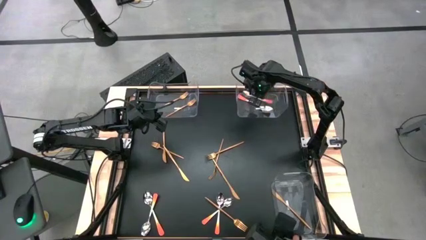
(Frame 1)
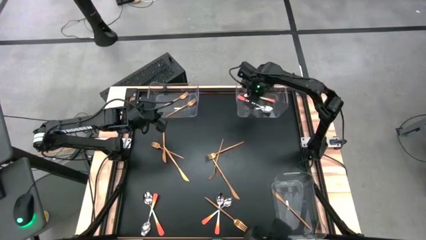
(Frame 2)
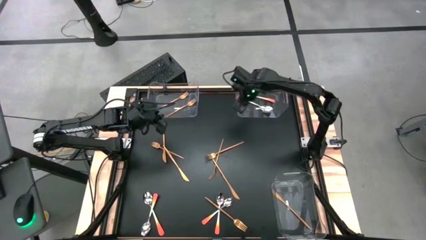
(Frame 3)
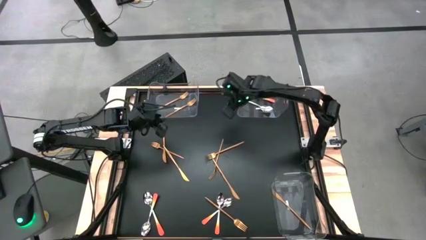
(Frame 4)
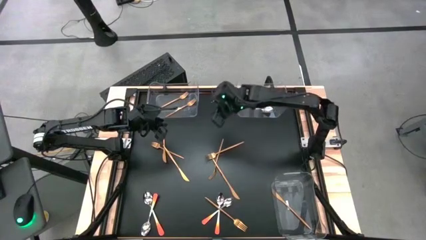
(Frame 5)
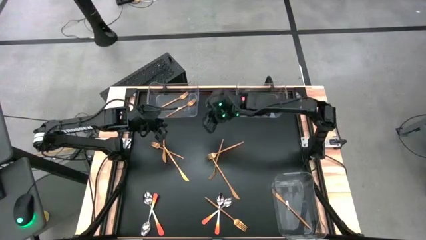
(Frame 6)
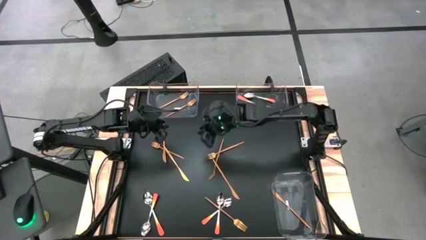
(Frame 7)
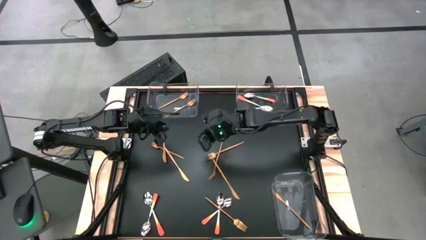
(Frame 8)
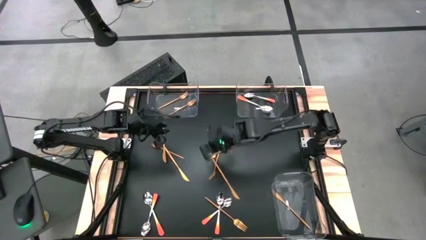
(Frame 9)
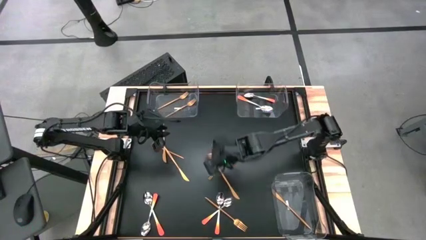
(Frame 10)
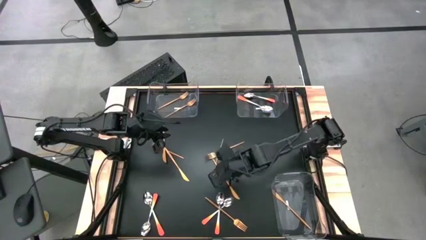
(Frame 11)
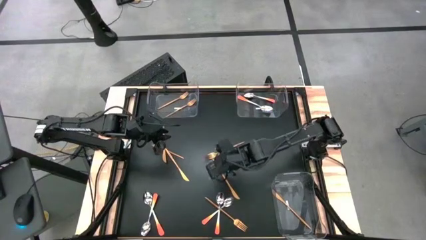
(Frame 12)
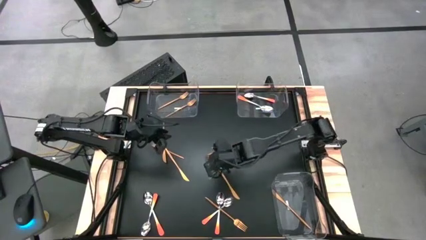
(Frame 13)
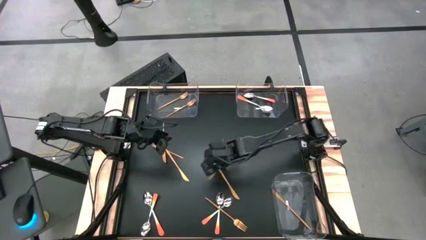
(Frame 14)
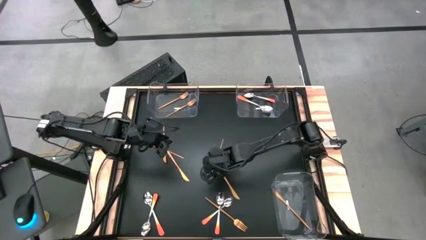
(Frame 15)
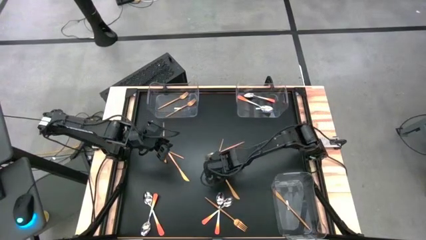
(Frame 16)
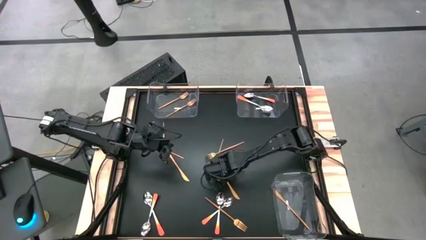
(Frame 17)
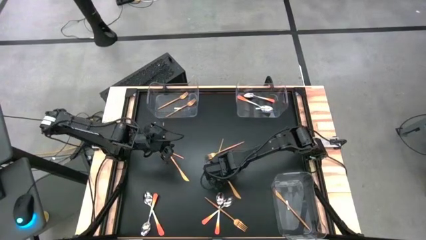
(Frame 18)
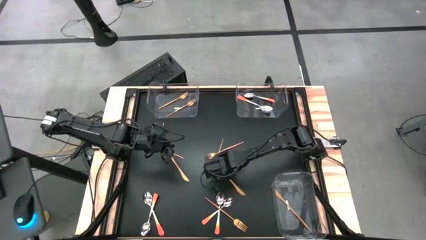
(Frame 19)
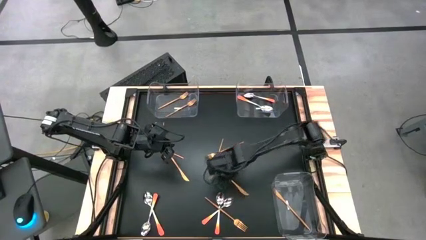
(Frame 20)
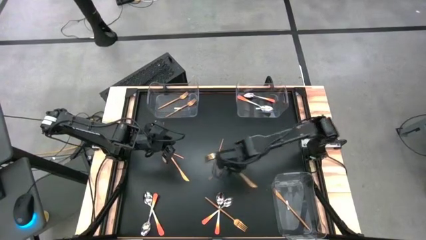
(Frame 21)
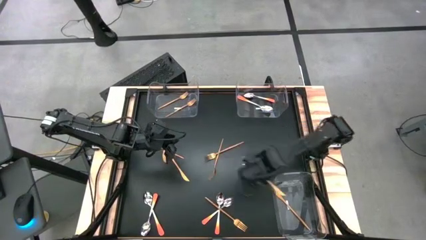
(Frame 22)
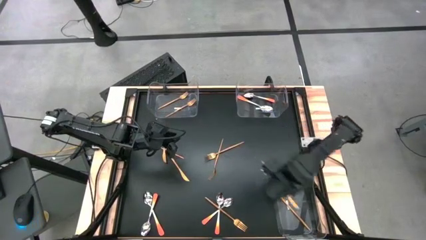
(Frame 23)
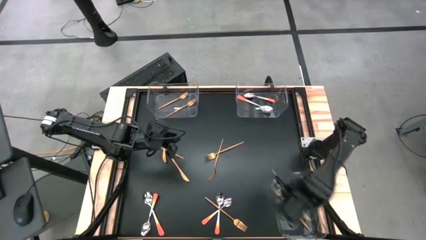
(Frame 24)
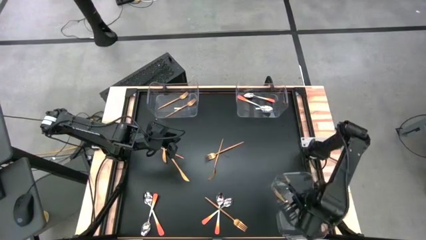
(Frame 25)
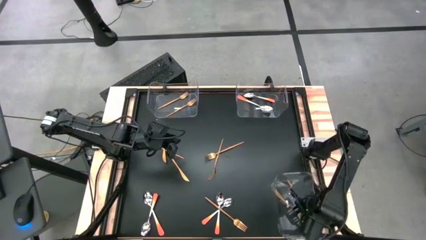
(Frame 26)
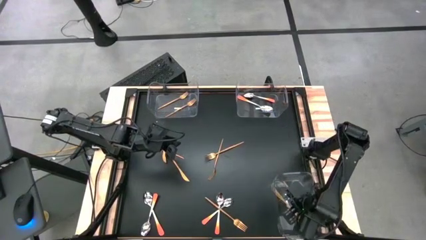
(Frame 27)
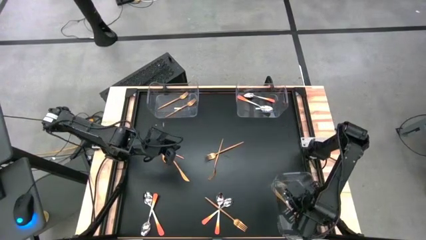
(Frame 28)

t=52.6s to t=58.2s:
Task: Sort silverware by color (type)
Put the gold table knife into the bottom left transparent bin

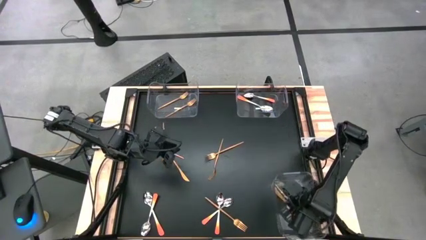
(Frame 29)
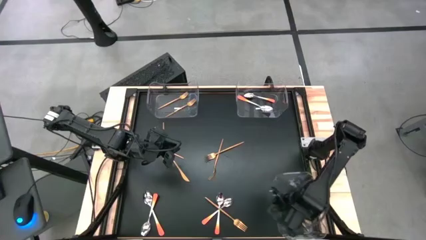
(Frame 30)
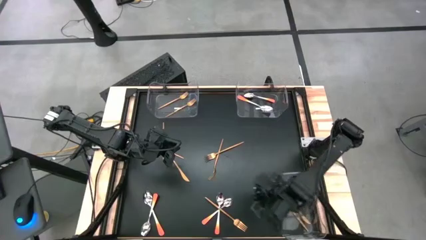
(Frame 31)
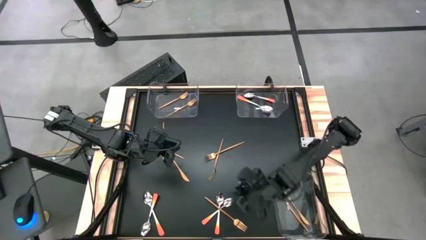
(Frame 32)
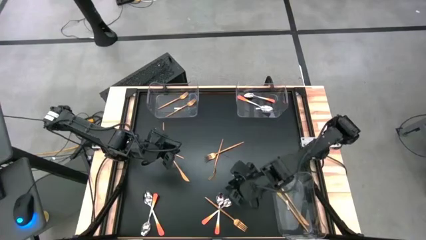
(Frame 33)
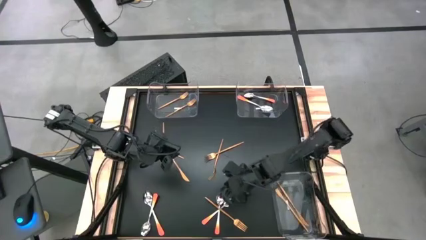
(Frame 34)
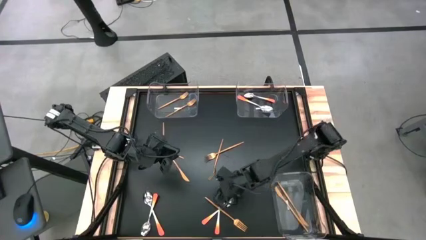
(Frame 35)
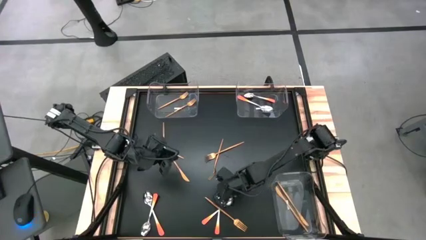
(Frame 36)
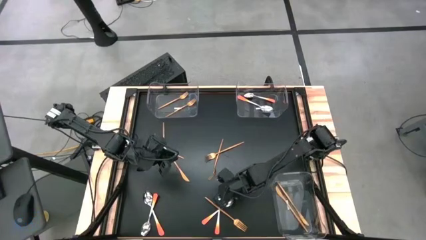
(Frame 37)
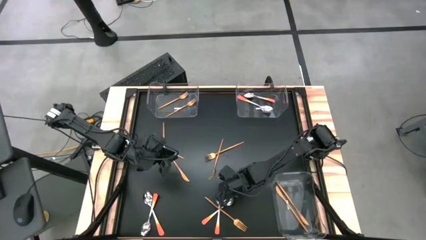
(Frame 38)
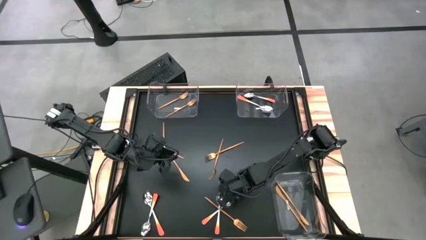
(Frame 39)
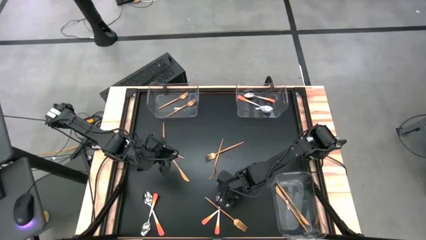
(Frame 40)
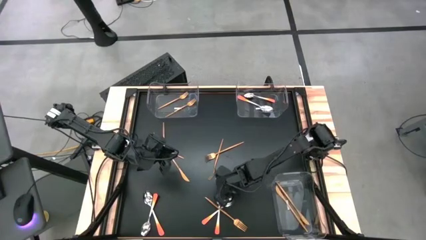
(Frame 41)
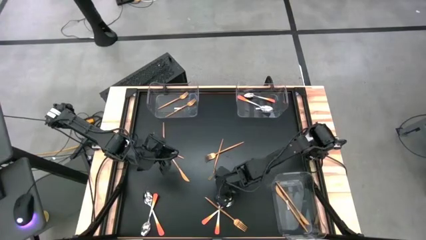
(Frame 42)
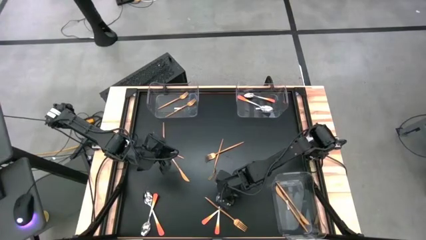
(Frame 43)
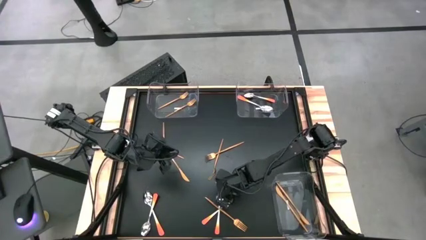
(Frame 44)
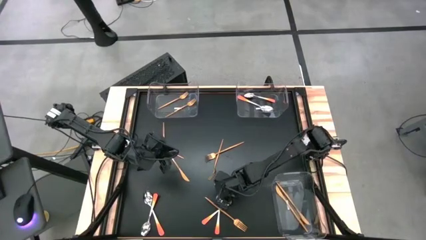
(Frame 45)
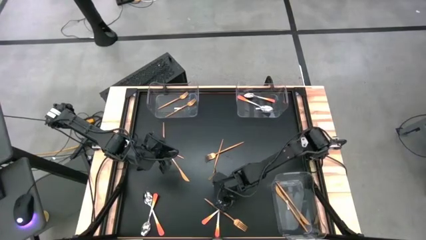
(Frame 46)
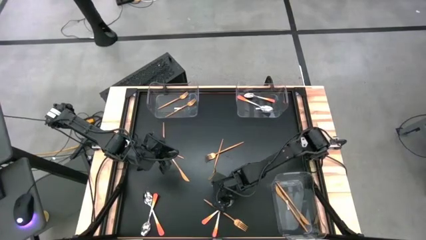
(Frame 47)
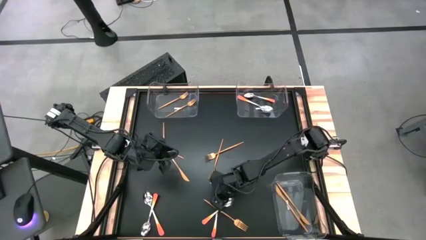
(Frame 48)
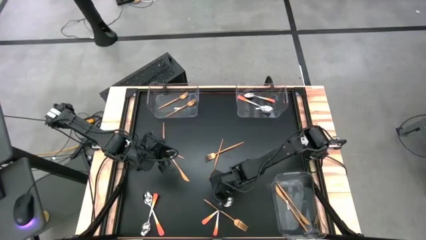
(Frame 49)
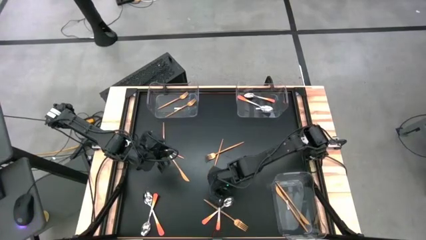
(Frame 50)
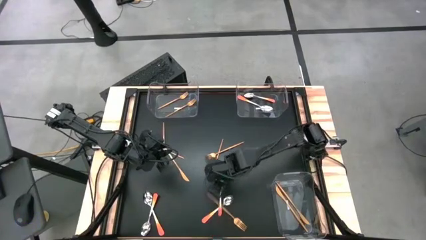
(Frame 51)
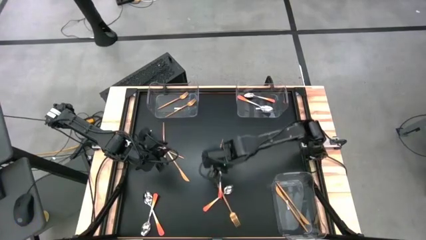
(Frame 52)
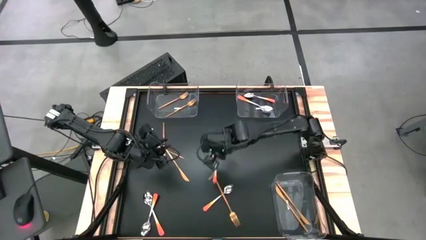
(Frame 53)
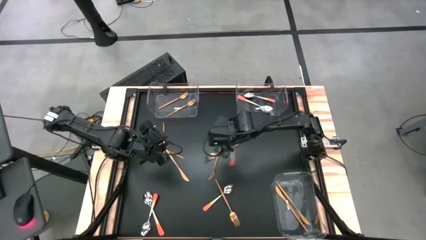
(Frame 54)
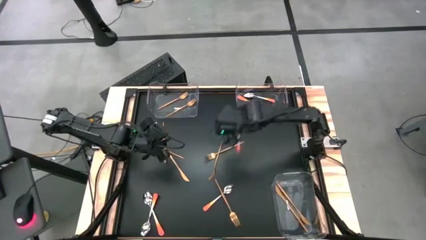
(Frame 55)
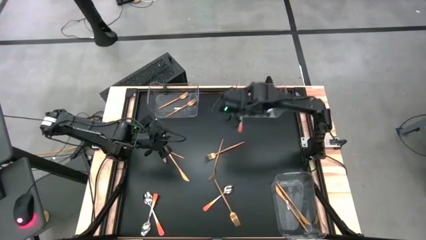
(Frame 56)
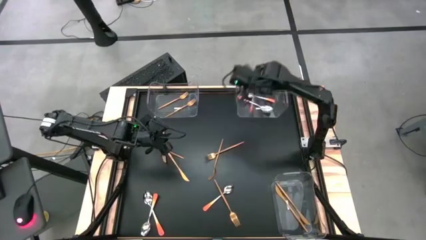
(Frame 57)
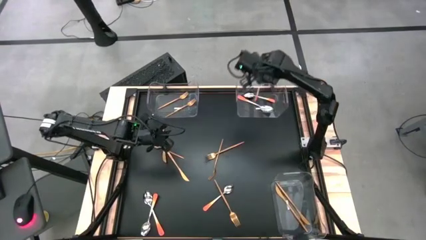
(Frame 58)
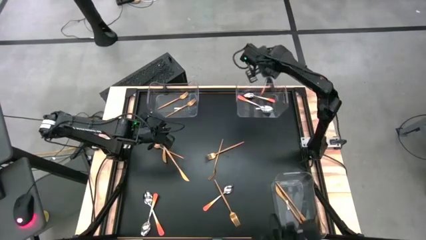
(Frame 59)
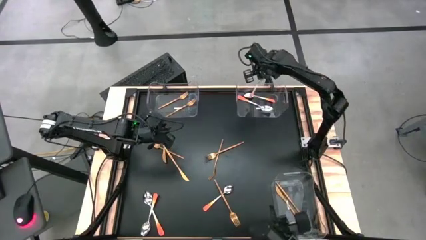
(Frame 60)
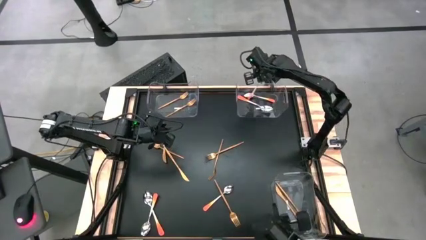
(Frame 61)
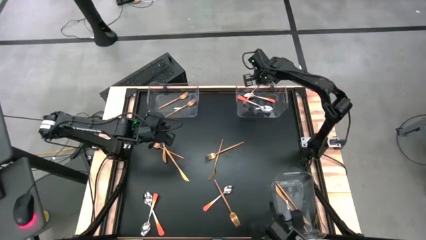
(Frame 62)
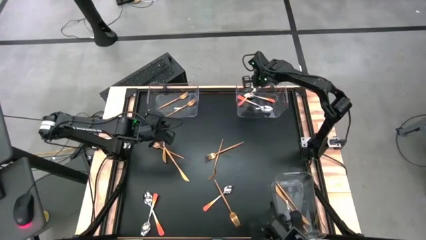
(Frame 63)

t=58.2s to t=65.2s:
Put the orange spoon into the top right transparent bin

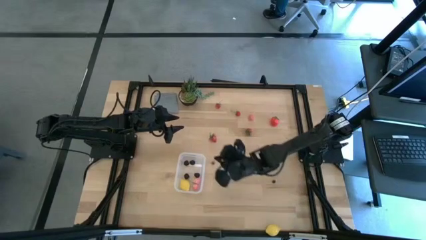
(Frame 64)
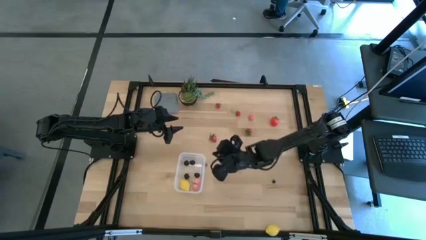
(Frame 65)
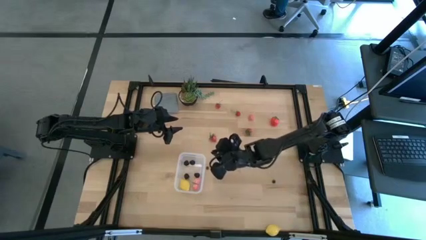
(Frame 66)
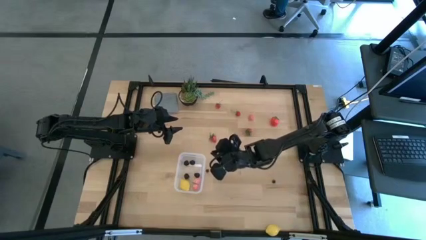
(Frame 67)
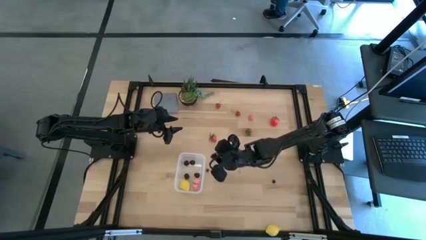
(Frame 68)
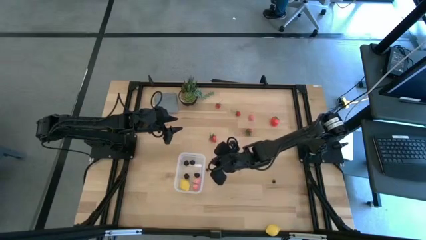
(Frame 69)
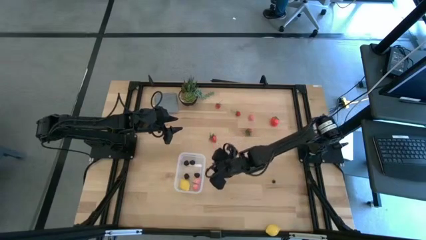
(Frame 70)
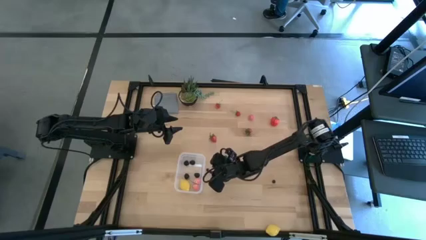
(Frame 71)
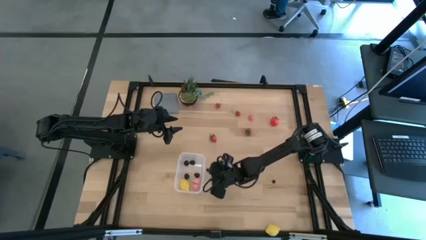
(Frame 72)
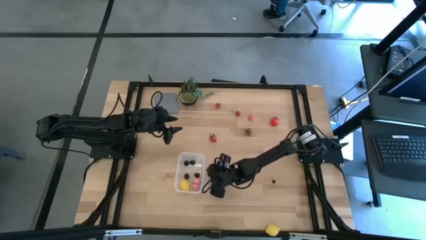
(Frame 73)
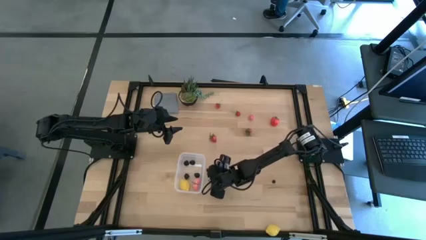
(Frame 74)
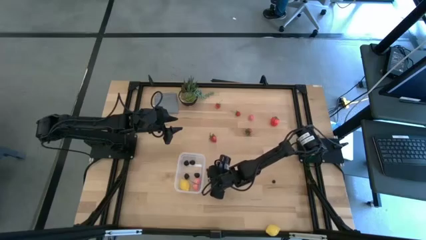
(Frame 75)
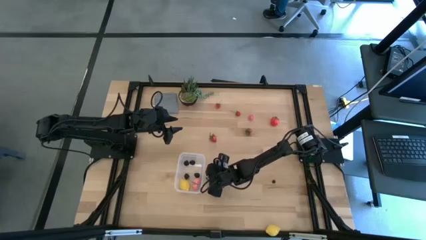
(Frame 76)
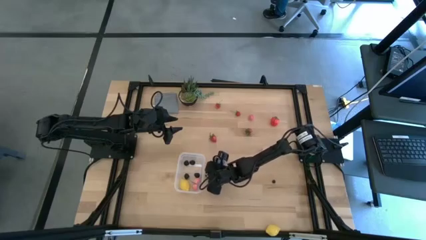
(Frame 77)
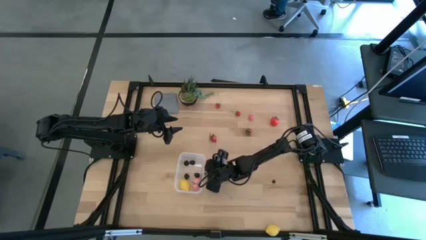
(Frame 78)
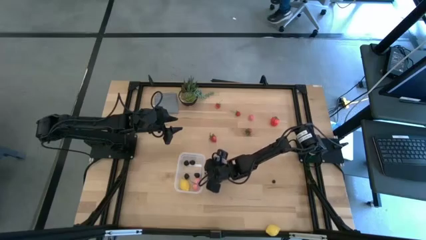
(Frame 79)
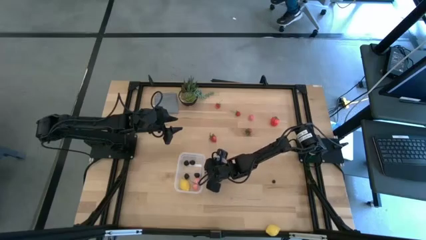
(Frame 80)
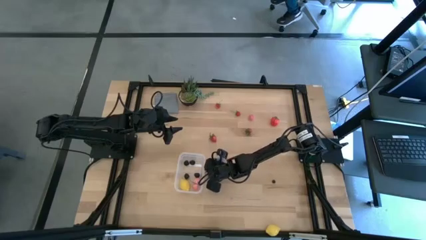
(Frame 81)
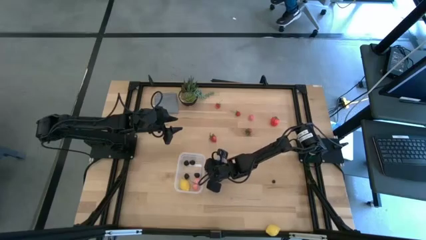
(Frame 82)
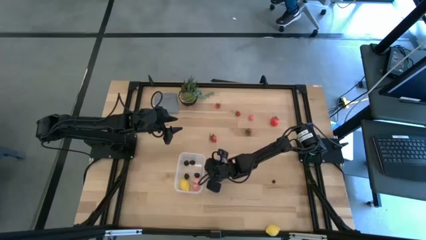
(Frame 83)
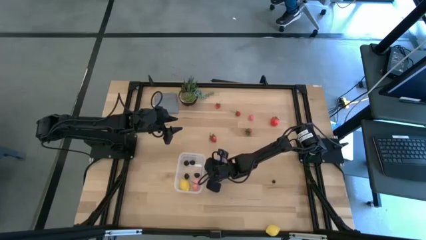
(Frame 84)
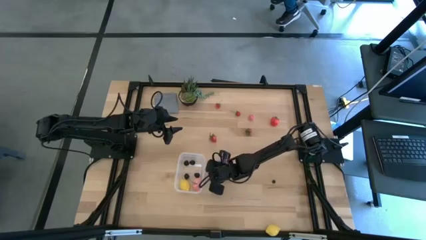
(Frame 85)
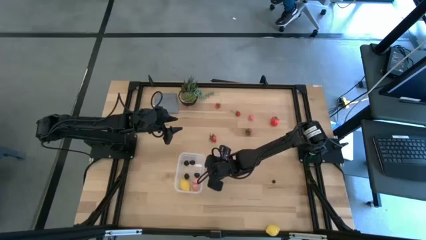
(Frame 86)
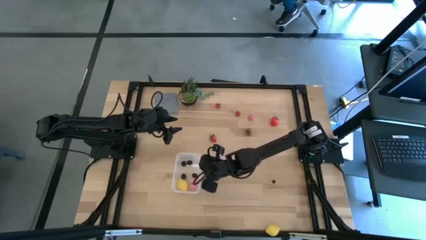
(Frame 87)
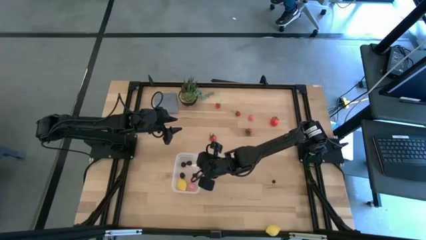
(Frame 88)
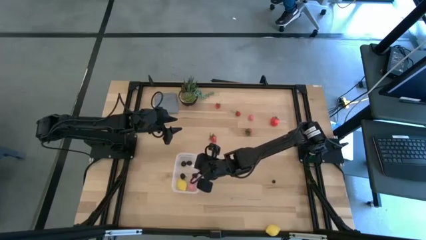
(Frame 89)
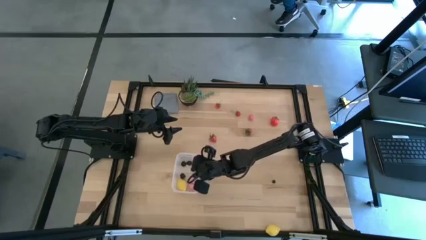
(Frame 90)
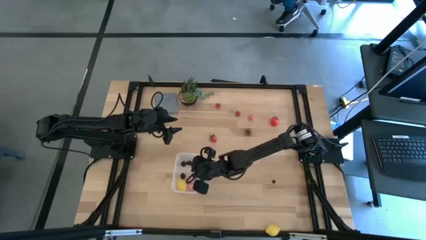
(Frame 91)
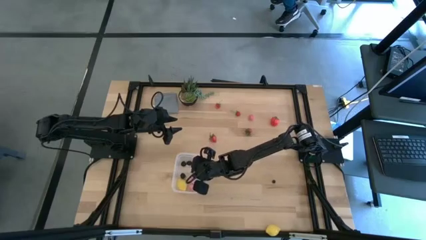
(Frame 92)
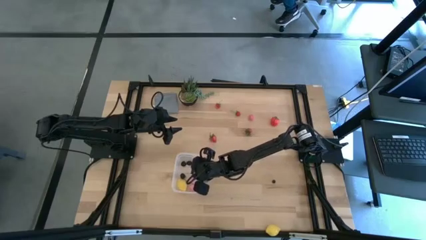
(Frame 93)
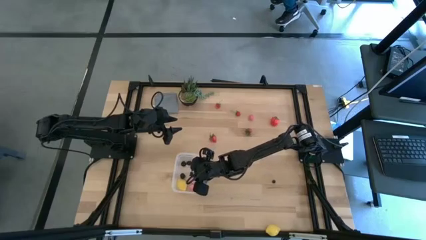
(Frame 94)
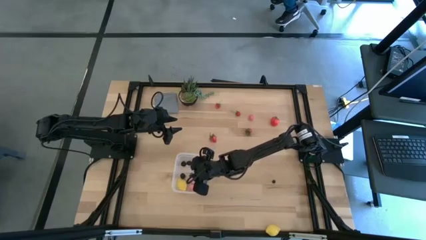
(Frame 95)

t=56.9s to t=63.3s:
Task: Pick and placing Produce into tupperware
Put the blueberry into the transparent bin
